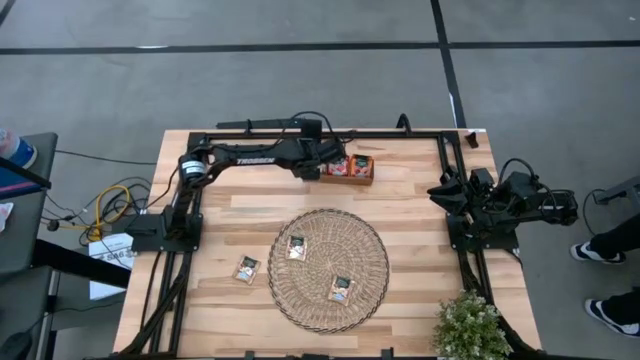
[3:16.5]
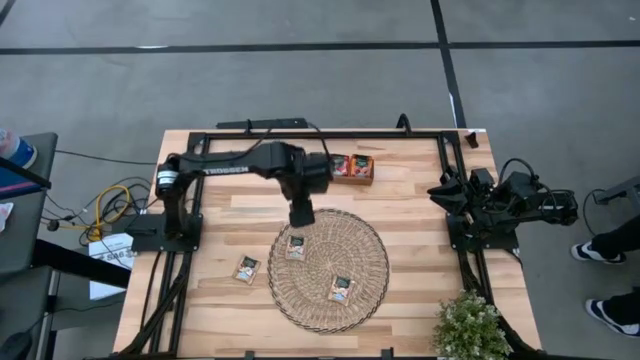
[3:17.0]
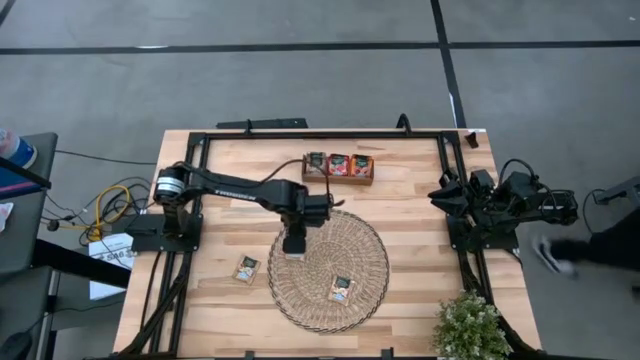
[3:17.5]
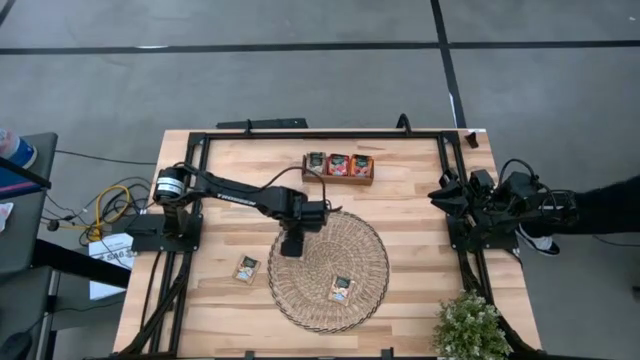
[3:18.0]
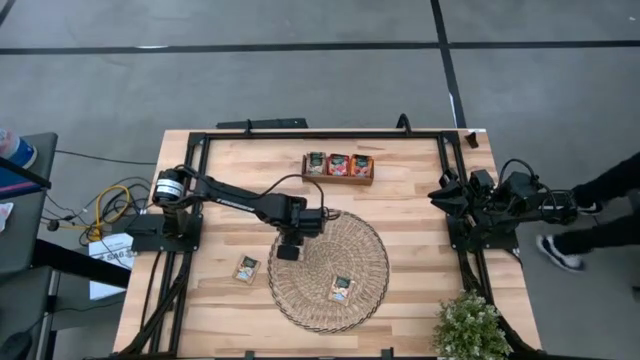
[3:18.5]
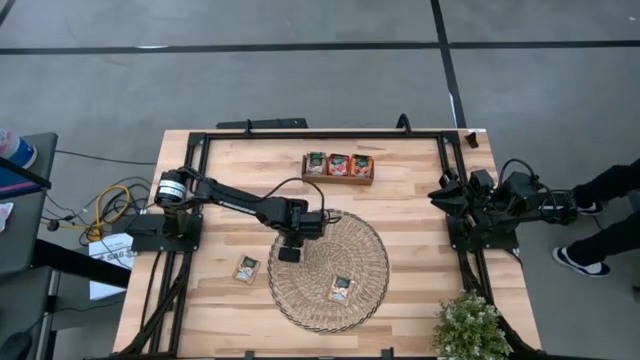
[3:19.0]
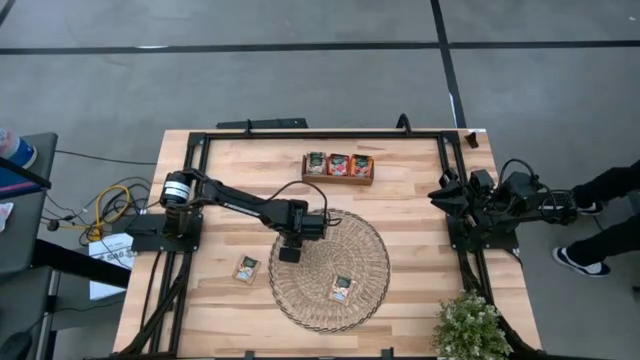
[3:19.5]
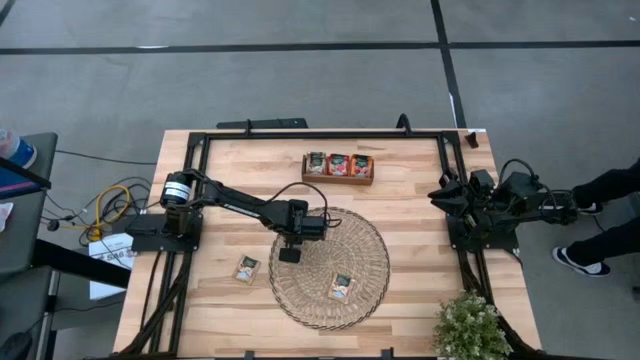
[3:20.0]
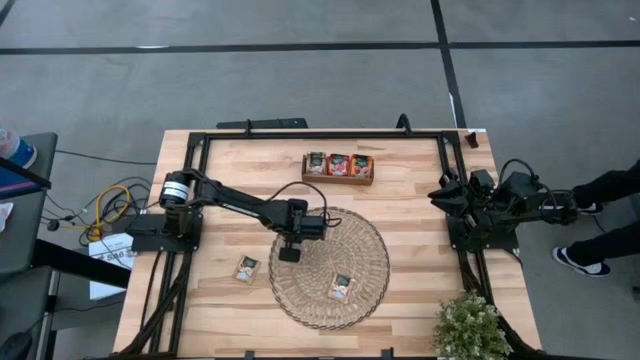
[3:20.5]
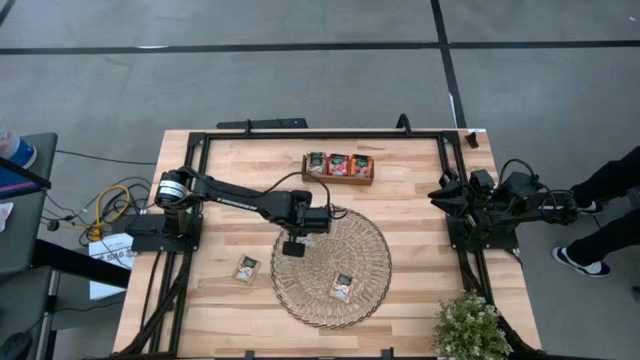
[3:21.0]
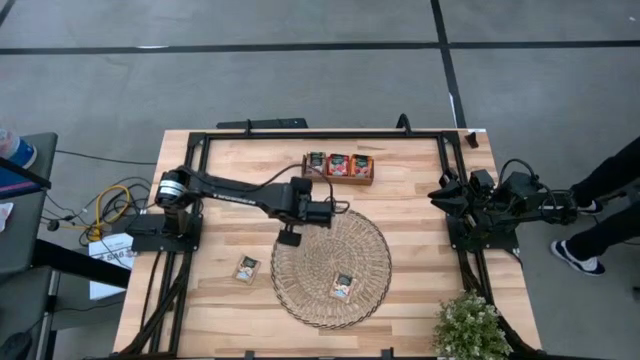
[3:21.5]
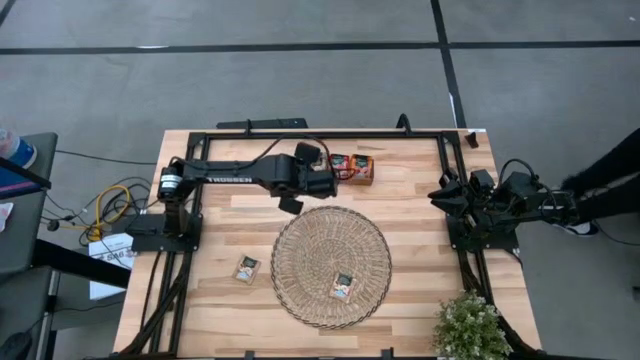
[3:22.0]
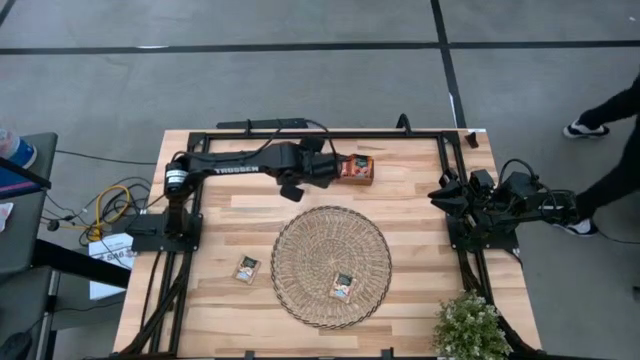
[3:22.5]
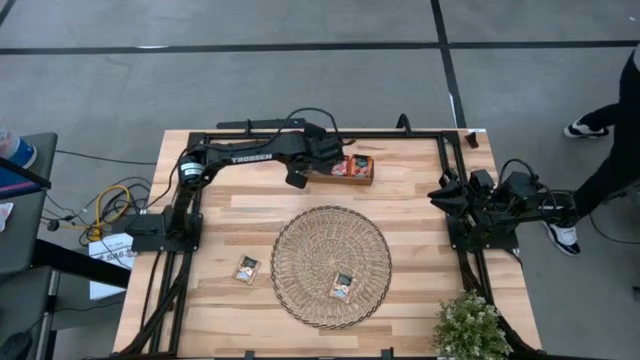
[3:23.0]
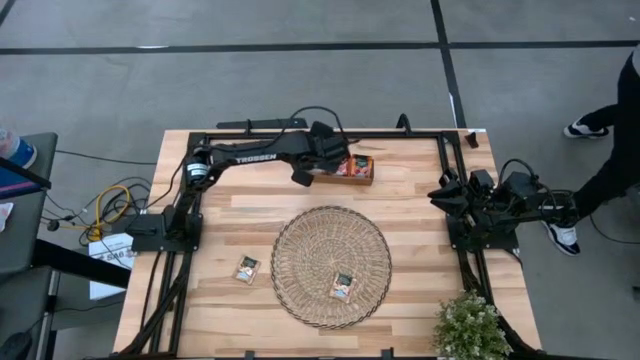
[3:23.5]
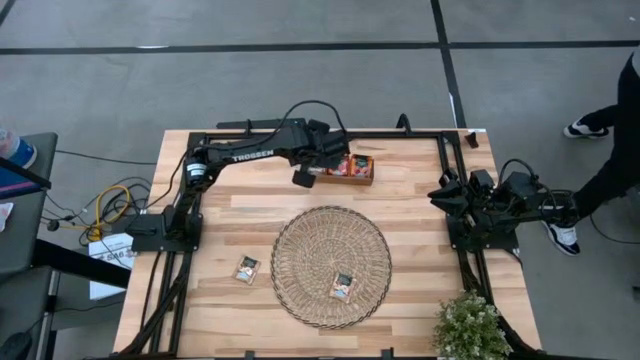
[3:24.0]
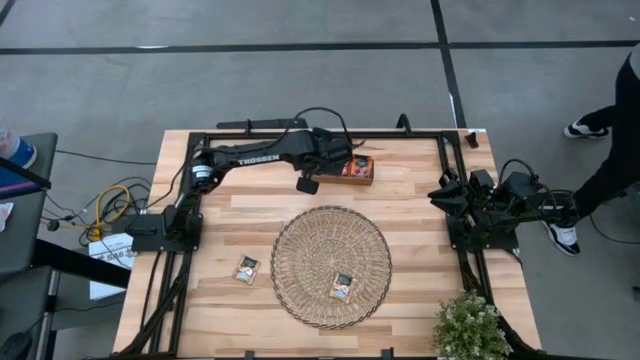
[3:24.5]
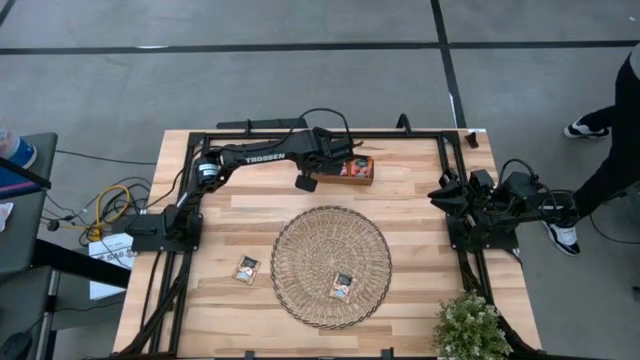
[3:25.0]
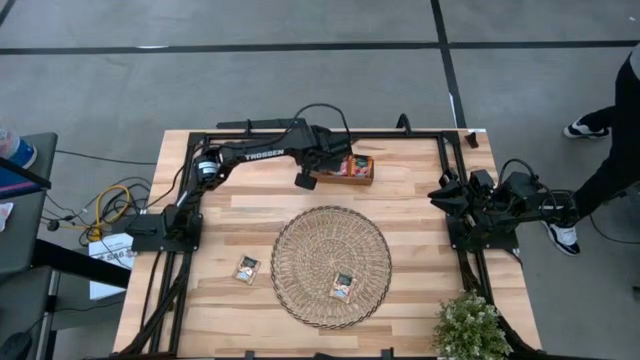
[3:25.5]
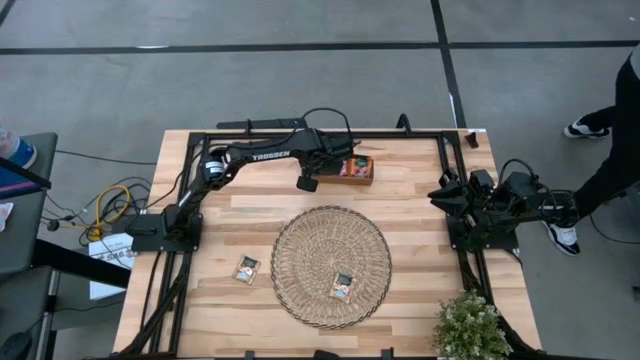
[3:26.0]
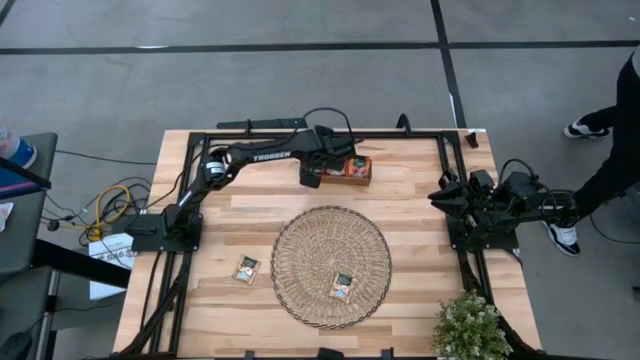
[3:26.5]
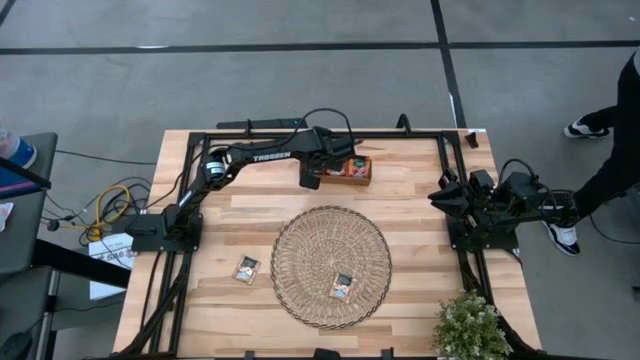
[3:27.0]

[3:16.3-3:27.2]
Task: Pick & Place Tea
Put the brown tea bag into the left section of the wooden organizer

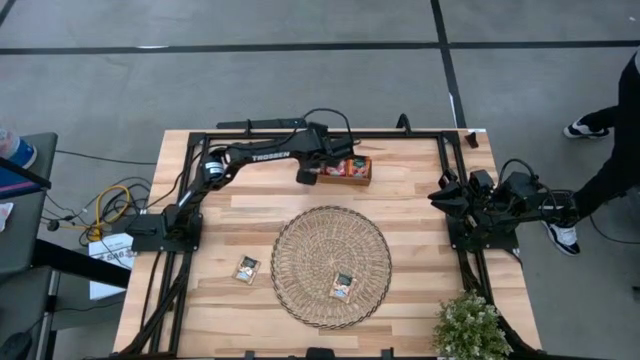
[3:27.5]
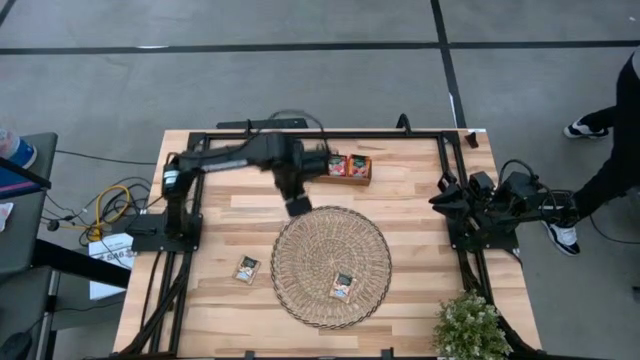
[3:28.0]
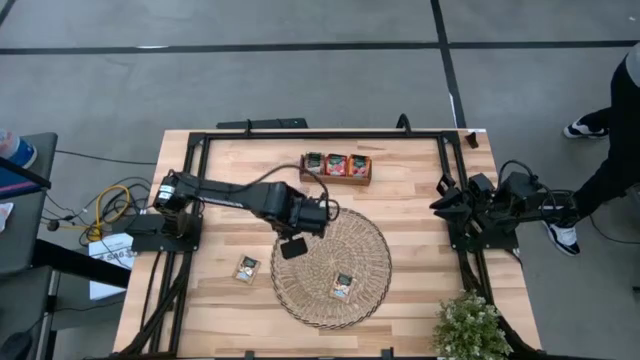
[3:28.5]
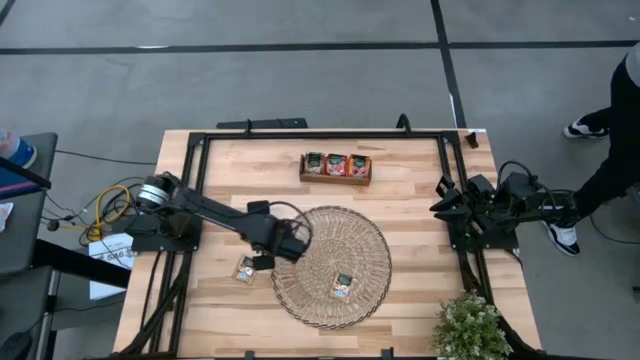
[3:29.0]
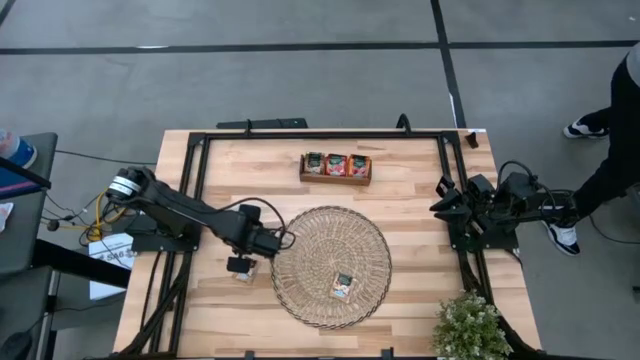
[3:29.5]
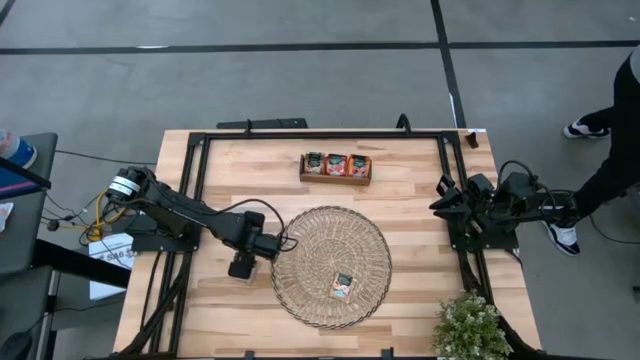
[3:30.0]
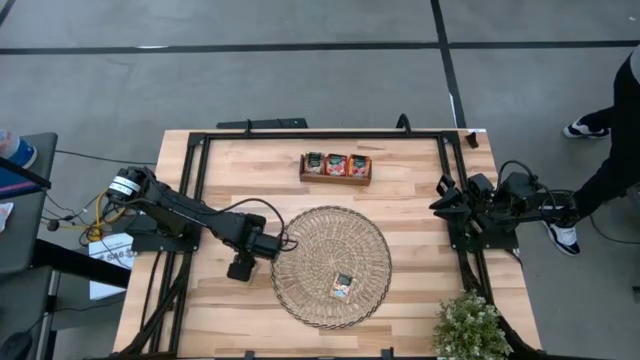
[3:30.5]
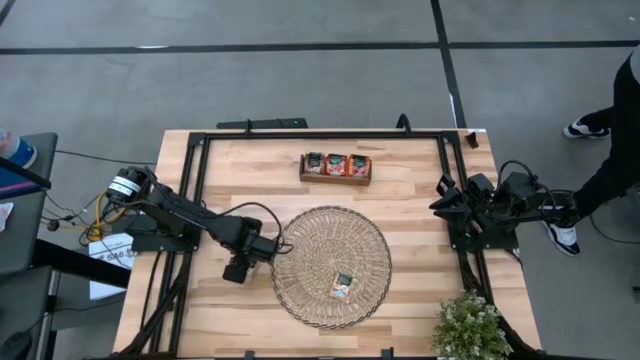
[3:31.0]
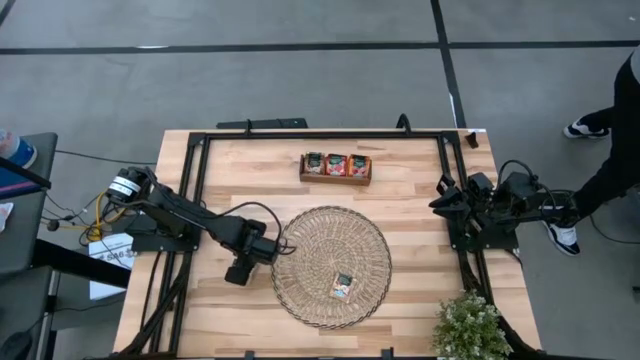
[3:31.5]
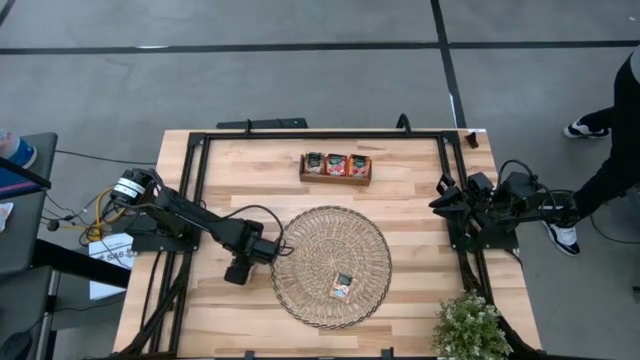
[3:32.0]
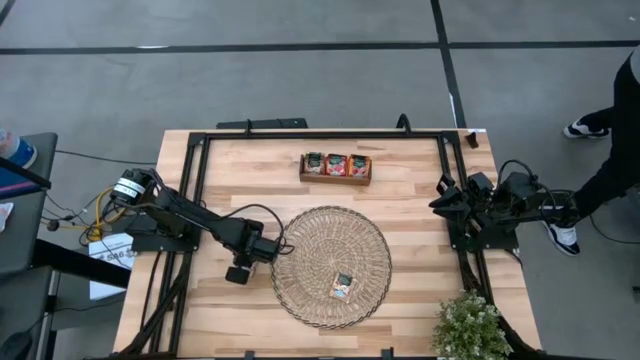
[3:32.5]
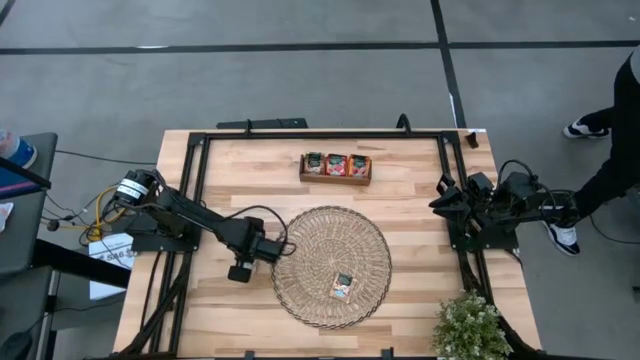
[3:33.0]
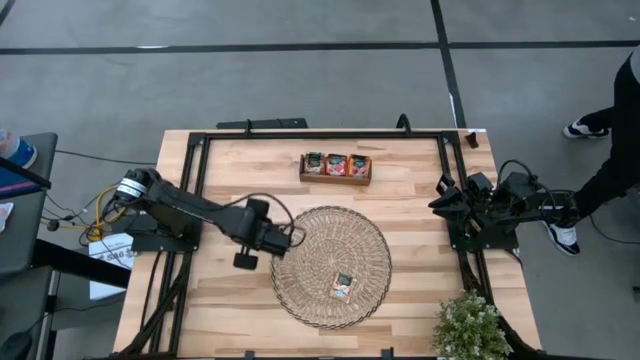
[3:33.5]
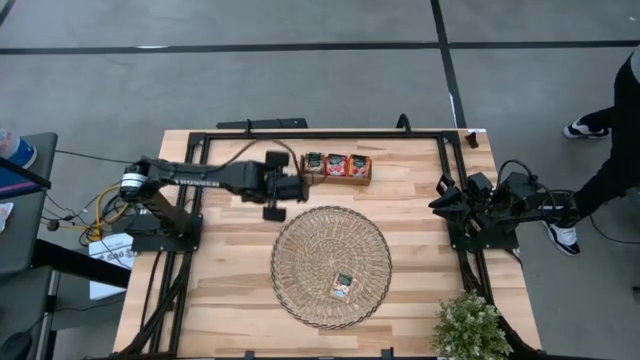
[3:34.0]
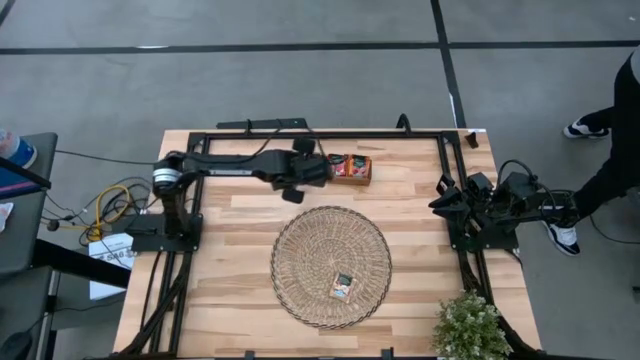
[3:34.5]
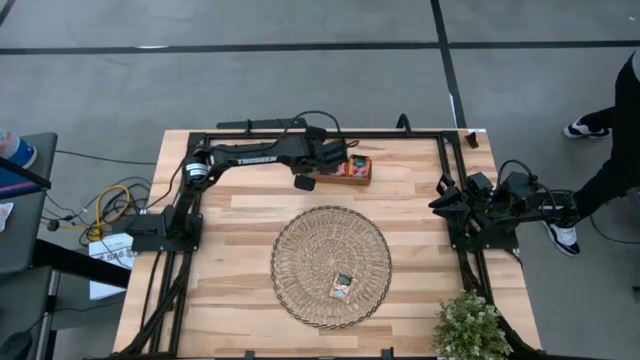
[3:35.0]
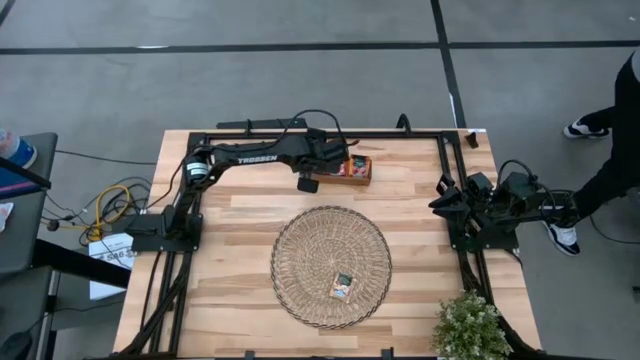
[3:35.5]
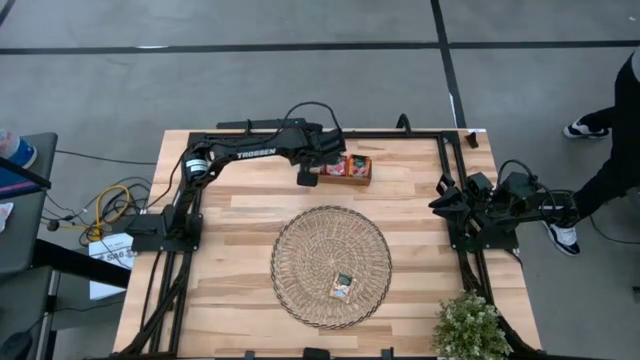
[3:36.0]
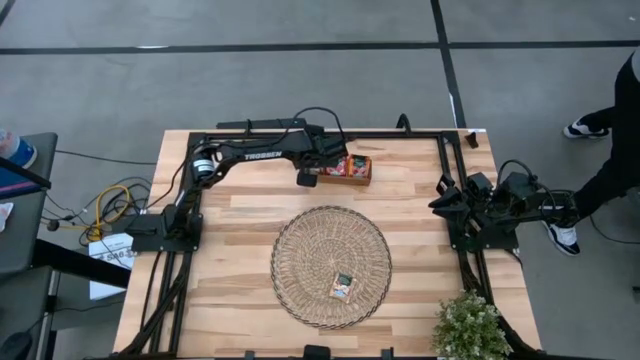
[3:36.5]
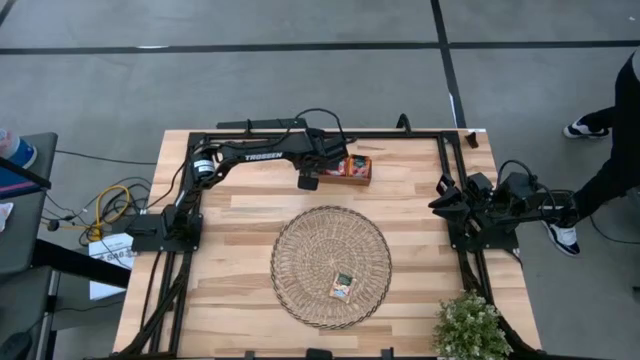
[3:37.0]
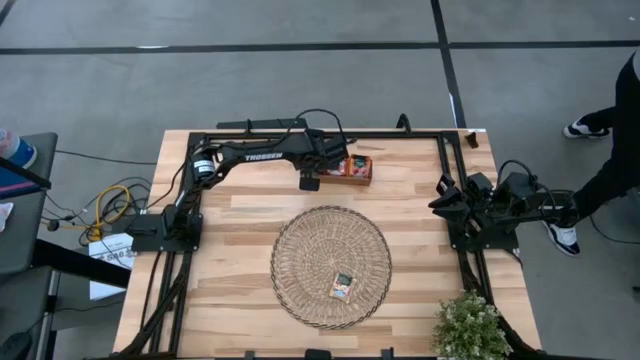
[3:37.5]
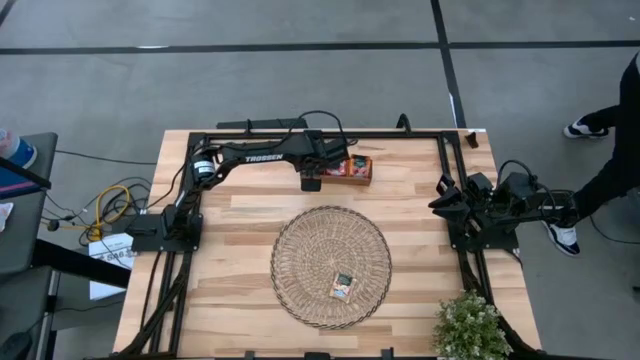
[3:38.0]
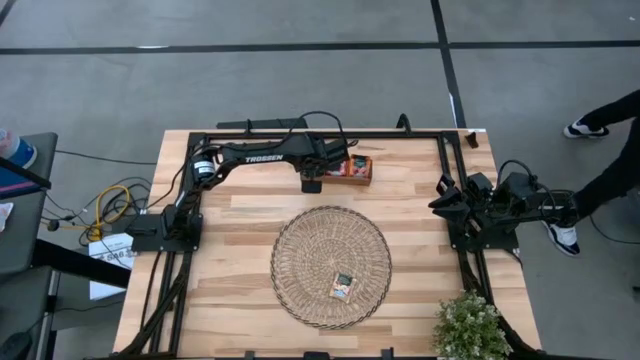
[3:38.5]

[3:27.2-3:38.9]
Put the brown tea bag into the left section of the wooden organizer
